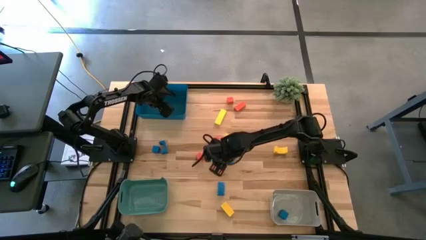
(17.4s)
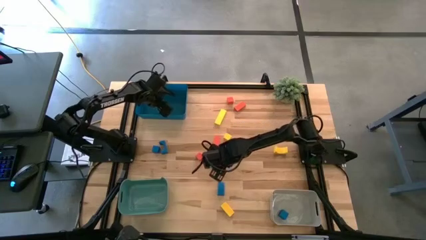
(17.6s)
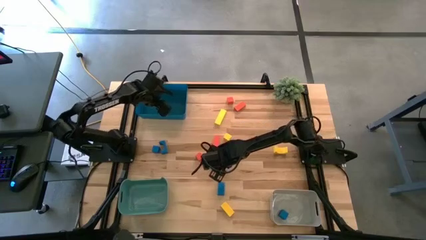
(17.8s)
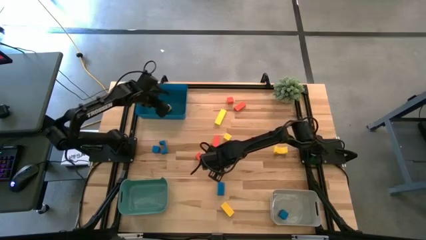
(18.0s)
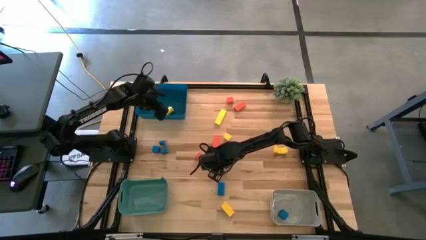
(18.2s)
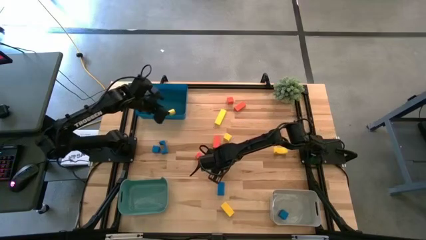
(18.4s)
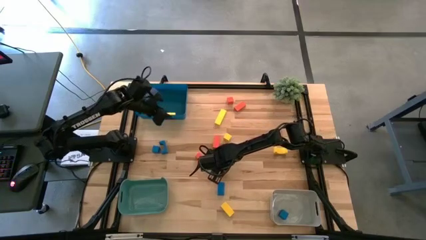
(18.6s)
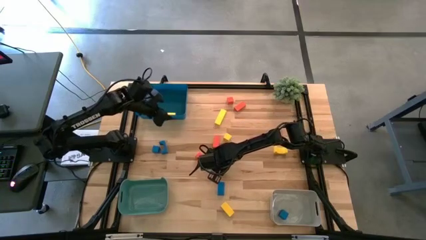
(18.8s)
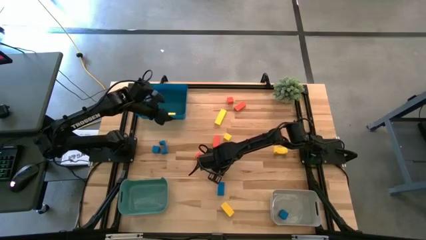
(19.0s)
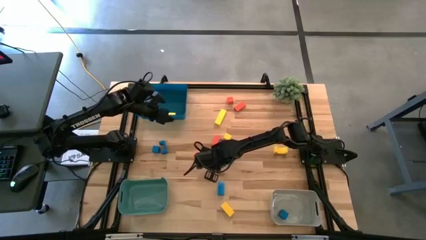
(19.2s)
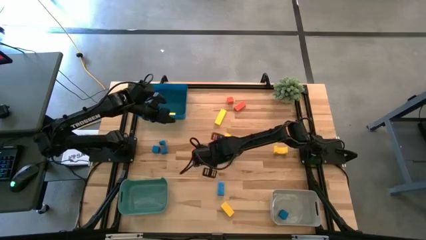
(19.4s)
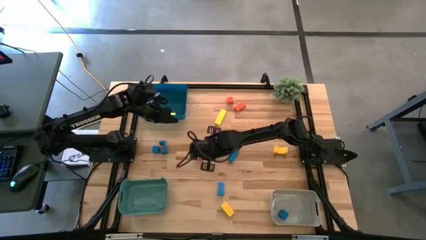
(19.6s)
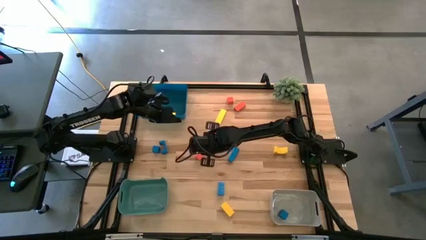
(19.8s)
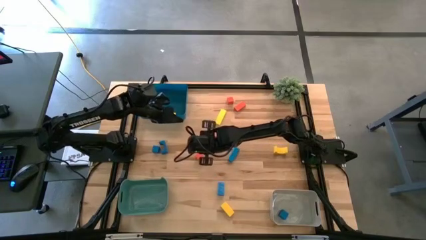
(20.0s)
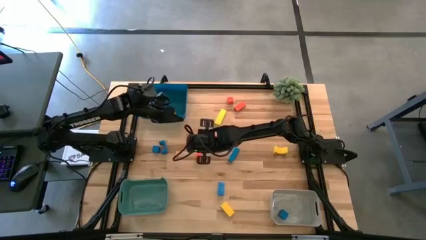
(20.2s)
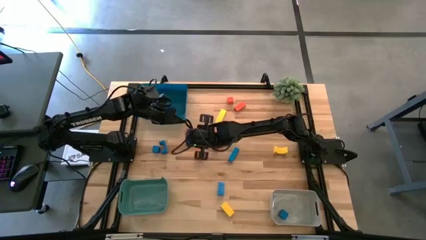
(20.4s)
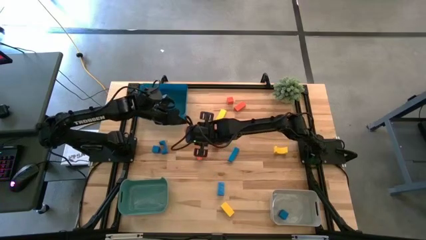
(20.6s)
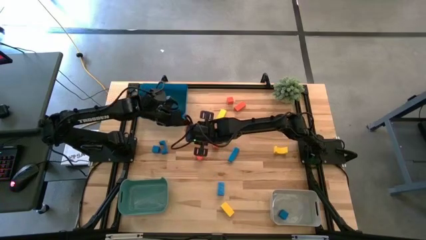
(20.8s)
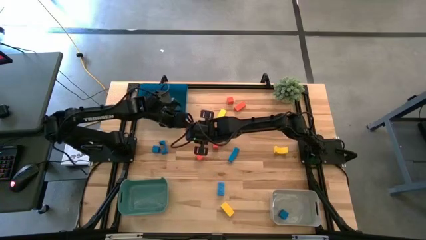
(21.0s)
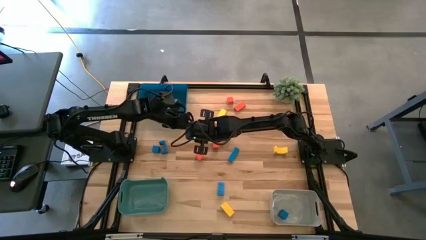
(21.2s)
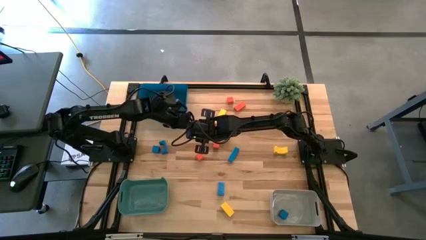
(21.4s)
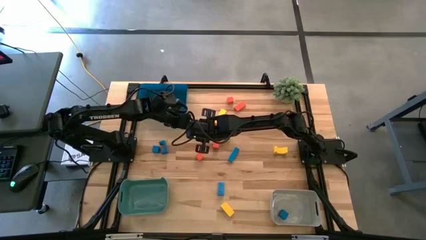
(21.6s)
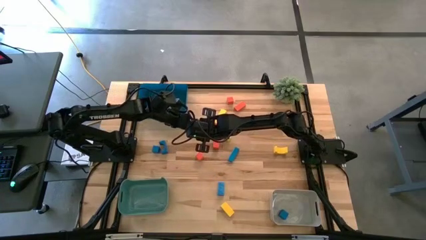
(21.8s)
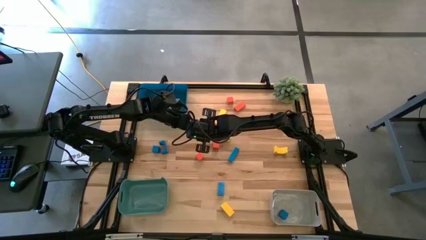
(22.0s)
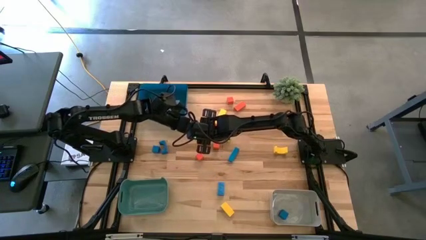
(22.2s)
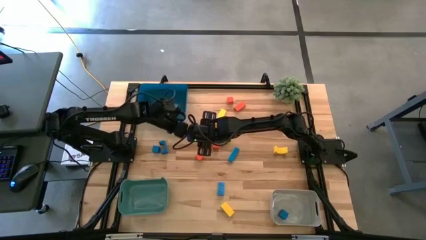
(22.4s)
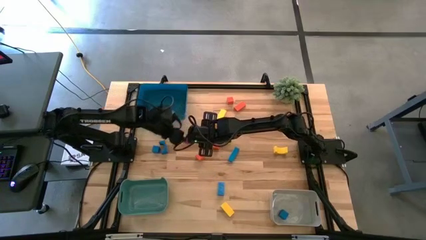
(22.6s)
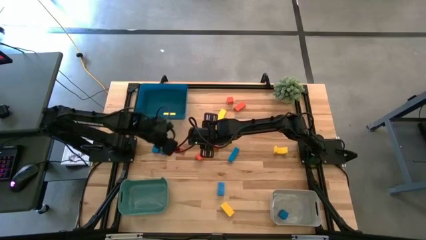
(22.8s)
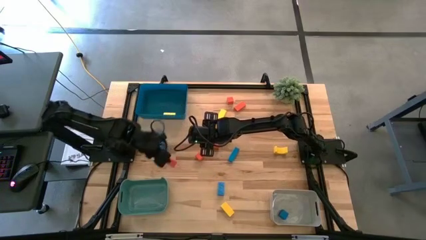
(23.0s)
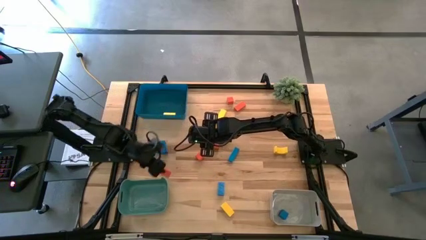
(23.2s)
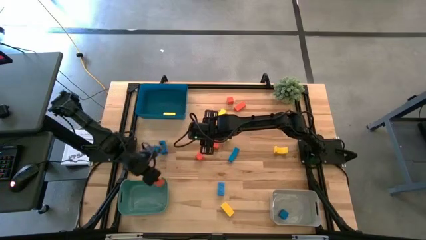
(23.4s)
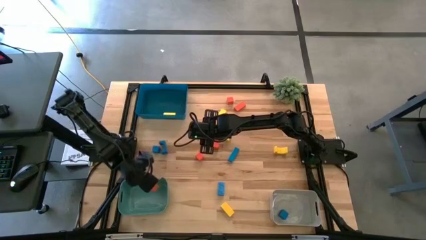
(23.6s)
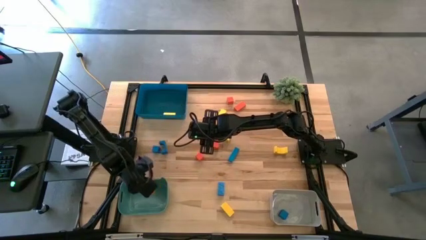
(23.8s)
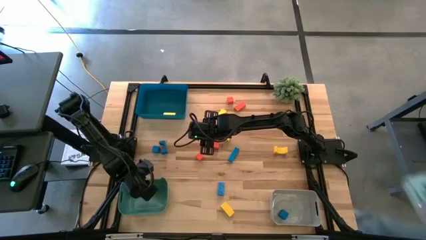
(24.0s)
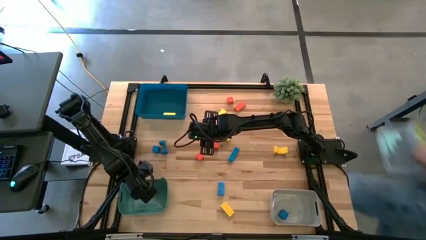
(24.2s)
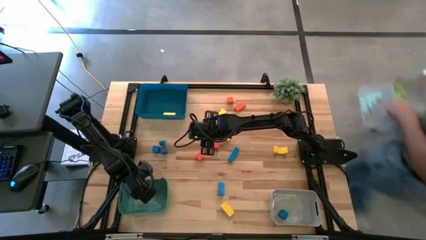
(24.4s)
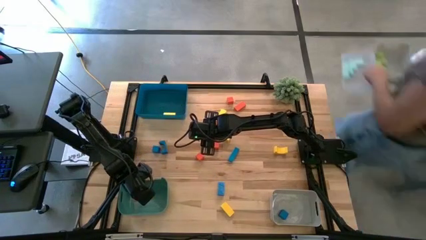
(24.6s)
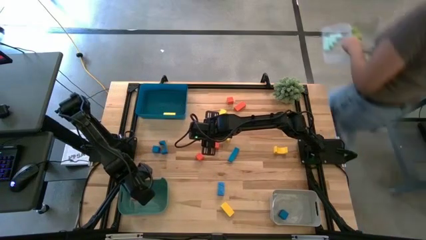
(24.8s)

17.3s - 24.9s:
Task: Sort & place blocks by color
Put the orange block into the green bin

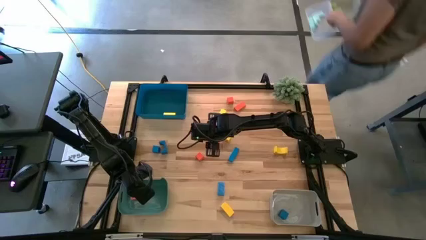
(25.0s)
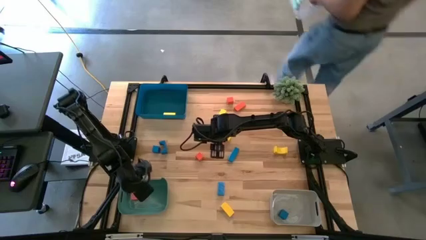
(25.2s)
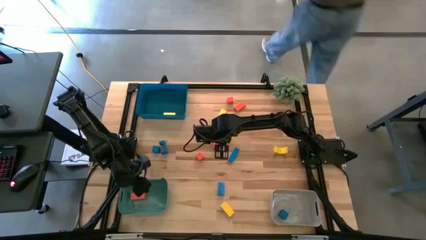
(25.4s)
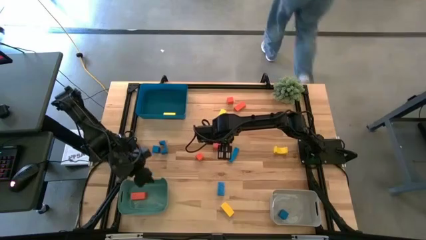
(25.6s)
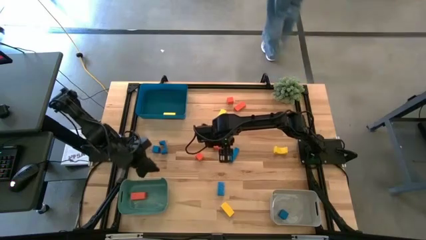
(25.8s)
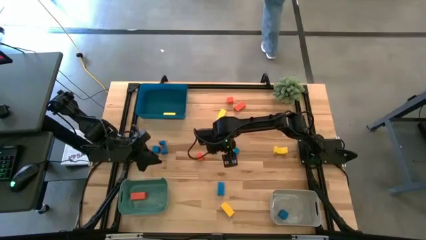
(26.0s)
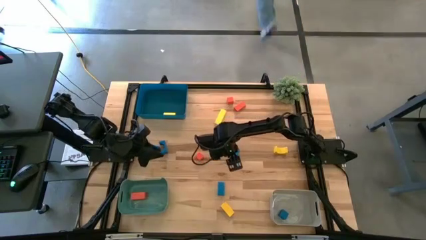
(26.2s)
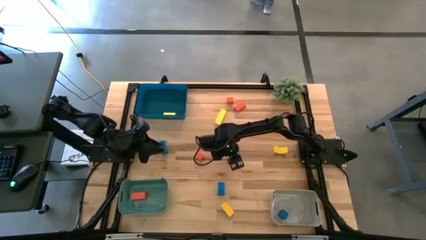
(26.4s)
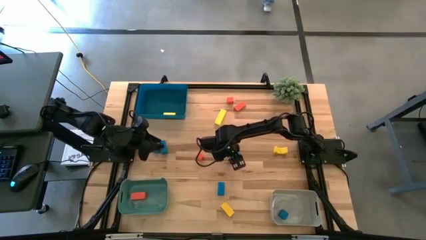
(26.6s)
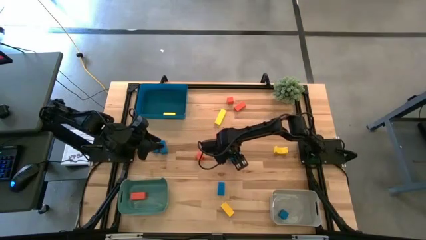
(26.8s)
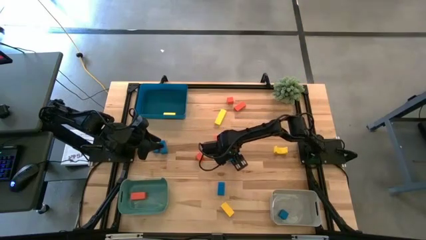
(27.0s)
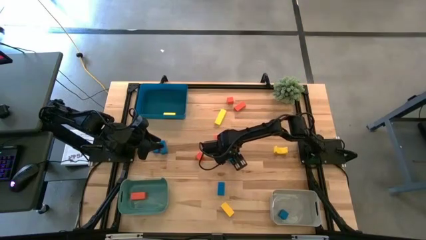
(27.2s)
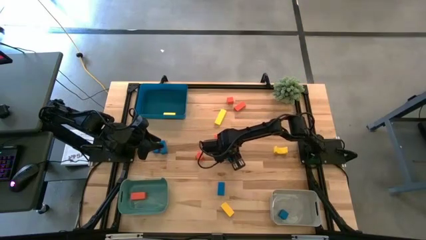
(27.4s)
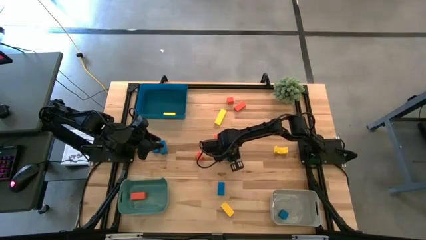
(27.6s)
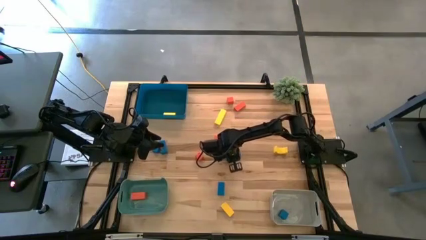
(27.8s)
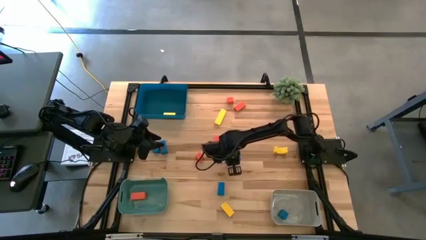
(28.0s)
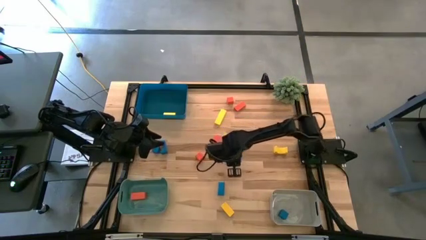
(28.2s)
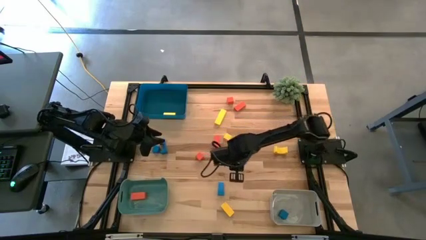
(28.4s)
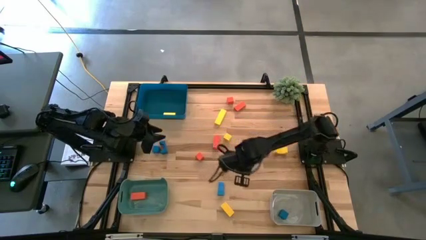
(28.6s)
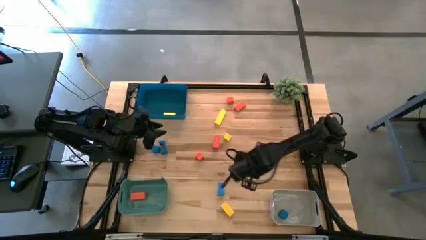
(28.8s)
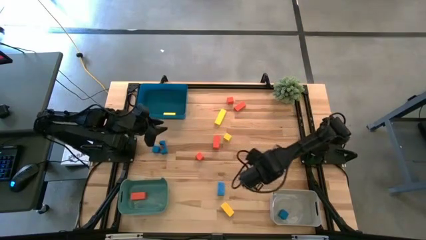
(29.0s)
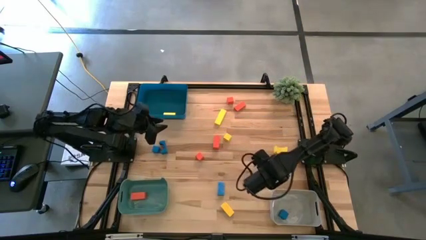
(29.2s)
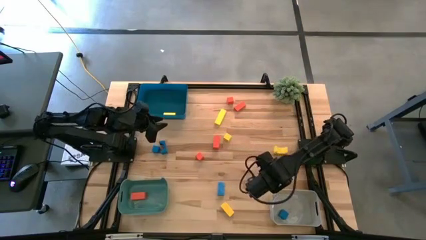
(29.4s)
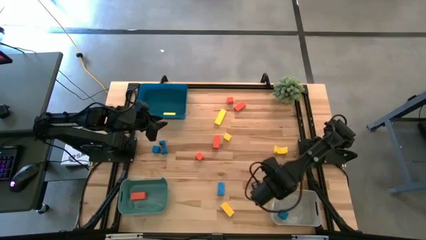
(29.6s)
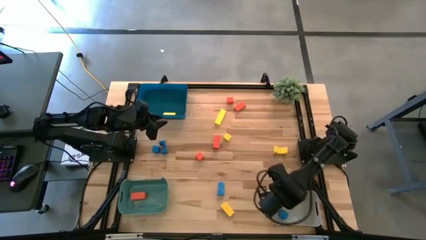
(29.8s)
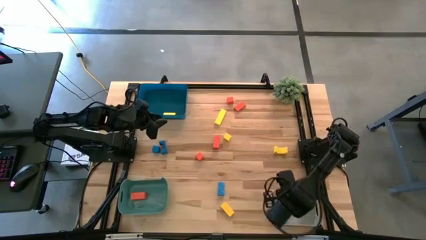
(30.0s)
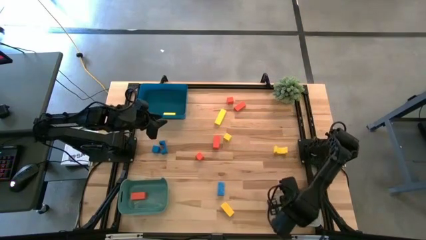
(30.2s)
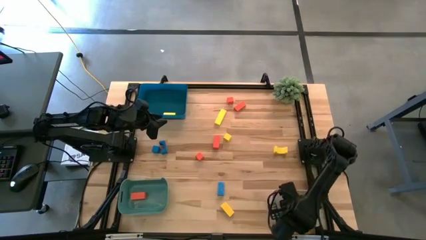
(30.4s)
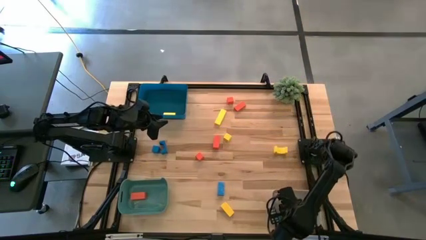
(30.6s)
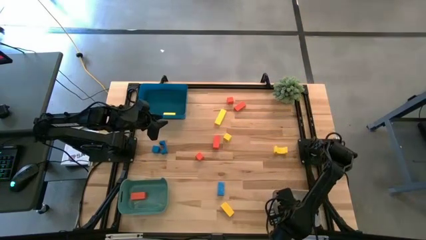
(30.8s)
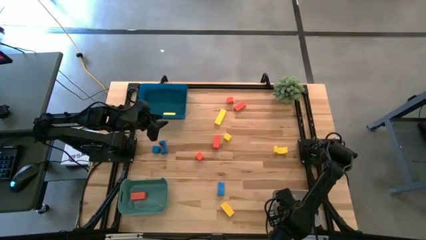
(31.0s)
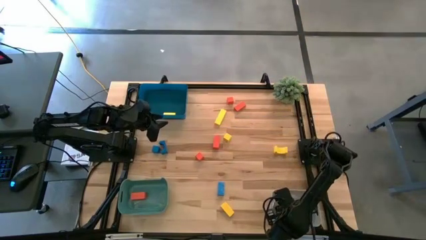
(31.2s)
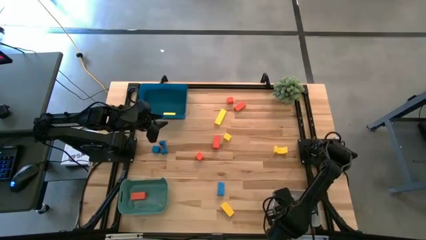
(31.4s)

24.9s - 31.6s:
Put the top right blue block into the white bin

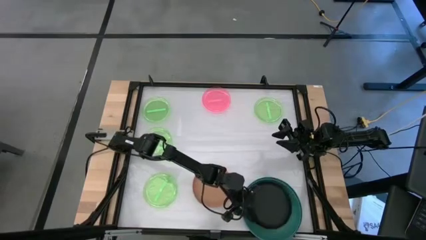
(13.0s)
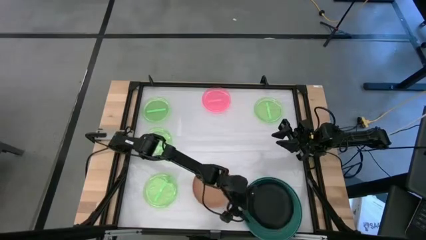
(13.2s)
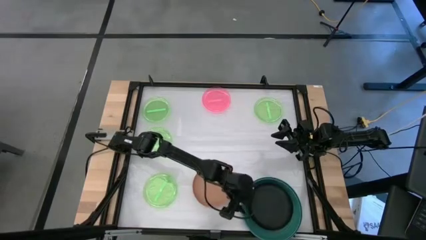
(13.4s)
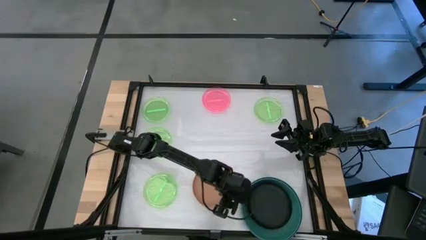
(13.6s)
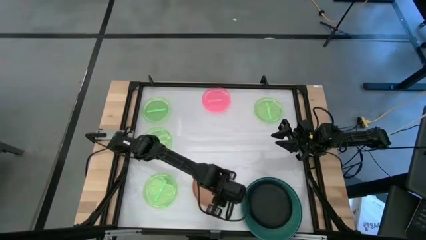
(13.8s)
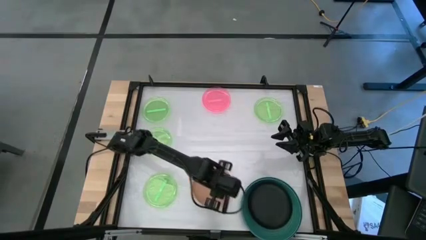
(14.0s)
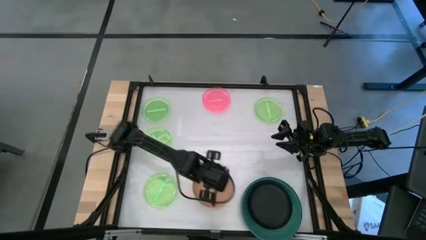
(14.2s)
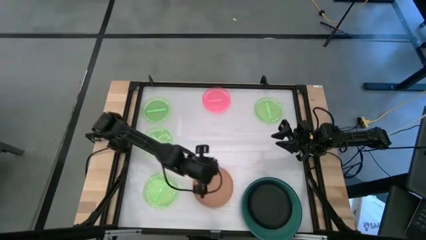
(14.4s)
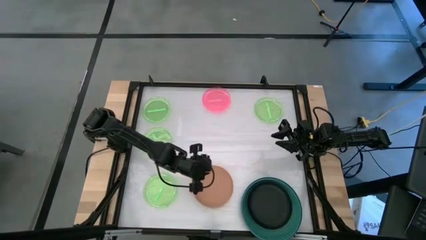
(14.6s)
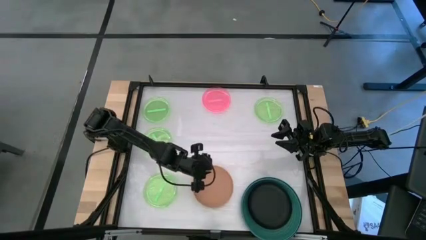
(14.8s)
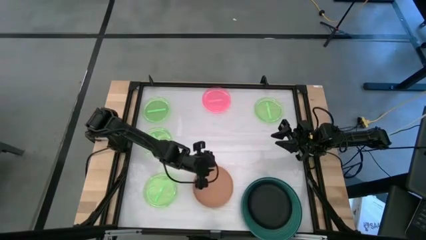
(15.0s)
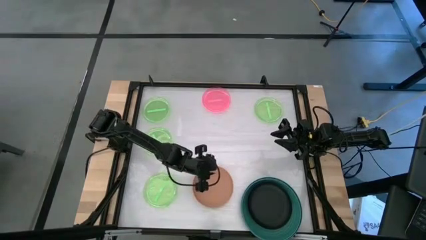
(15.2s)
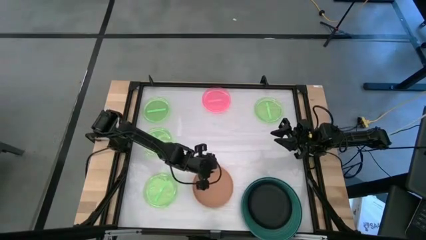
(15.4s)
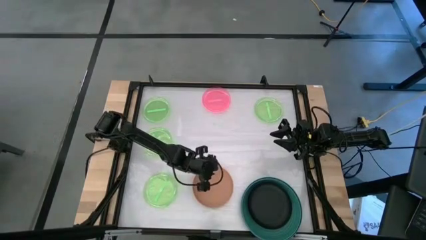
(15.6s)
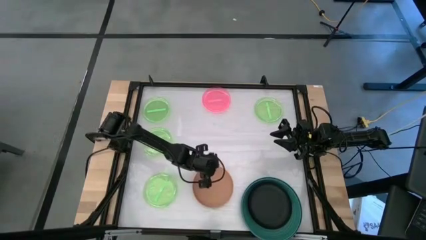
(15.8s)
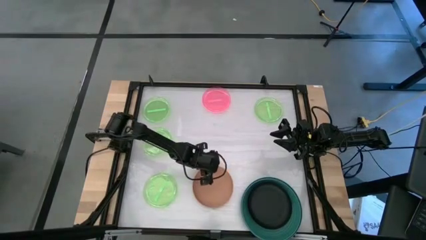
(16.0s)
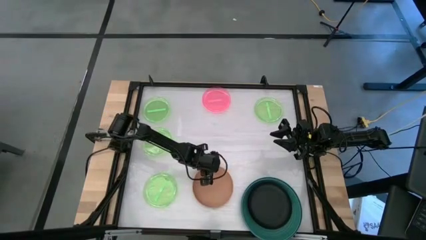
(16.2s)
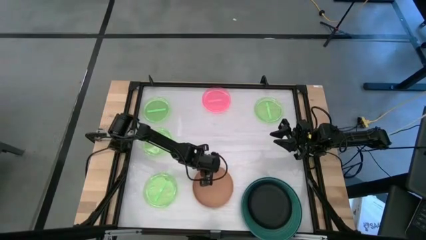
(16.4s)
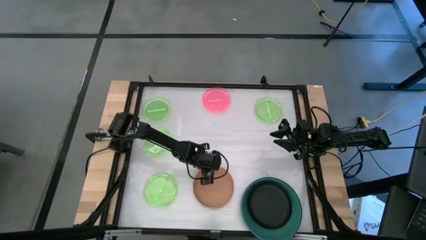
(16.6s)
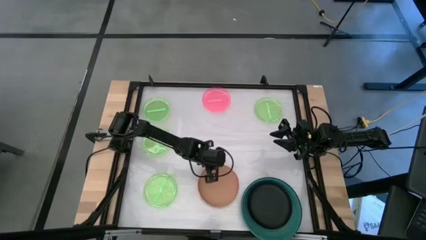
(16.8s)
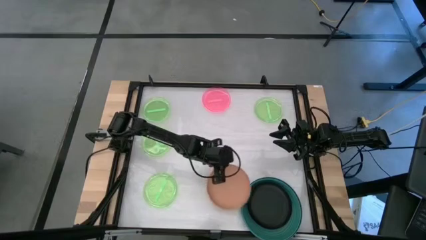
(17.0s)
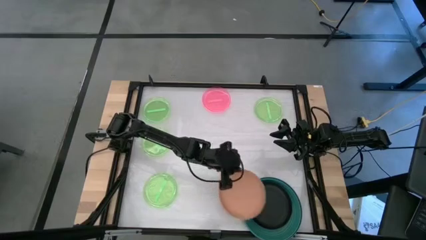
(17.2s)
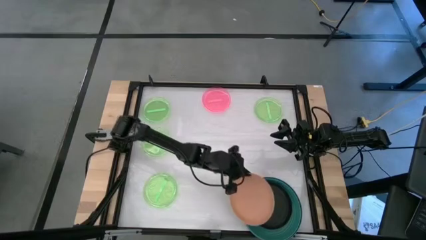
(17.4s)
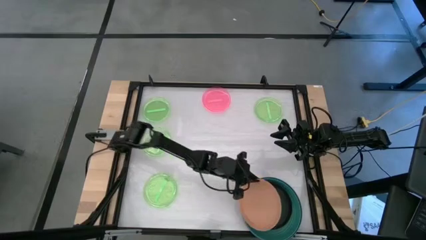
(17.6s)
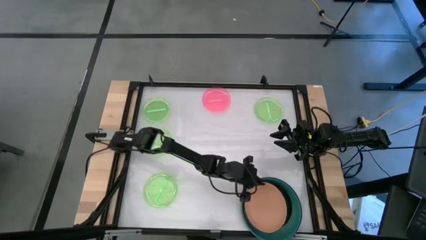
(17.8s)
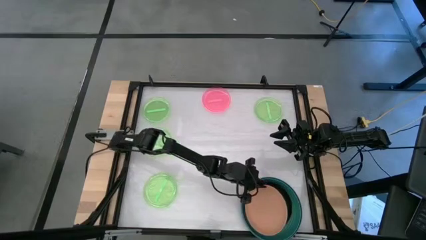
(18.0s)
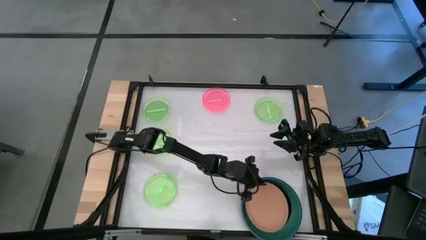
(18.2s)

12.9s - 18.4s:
Task: Stack plastic plates
Stack the brown plate on top of the black plate
